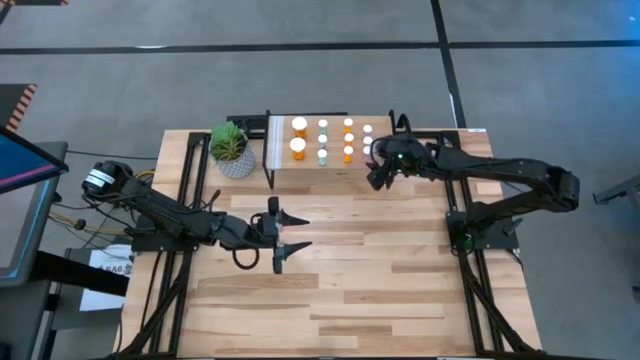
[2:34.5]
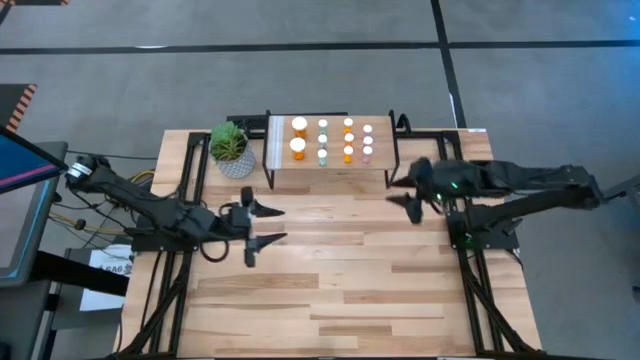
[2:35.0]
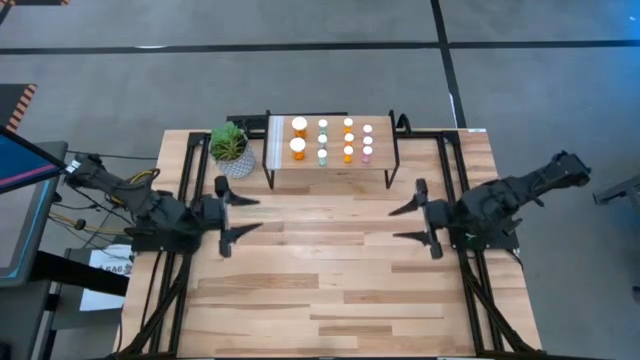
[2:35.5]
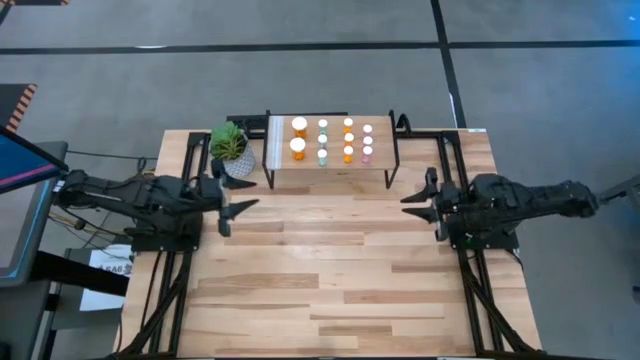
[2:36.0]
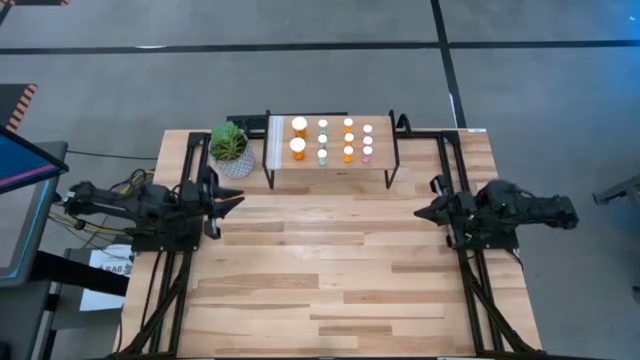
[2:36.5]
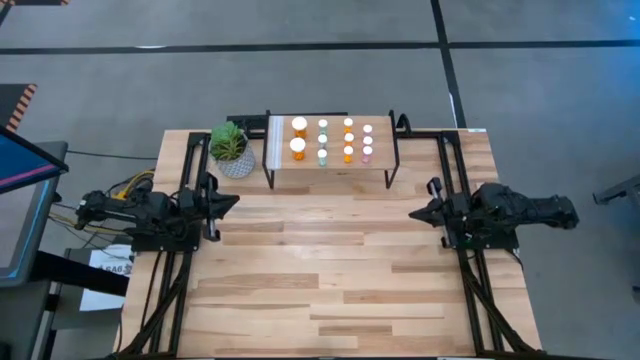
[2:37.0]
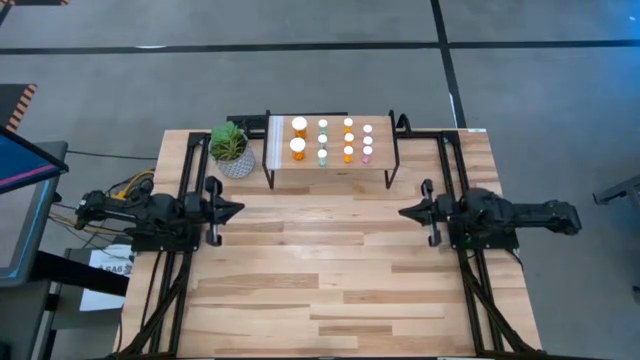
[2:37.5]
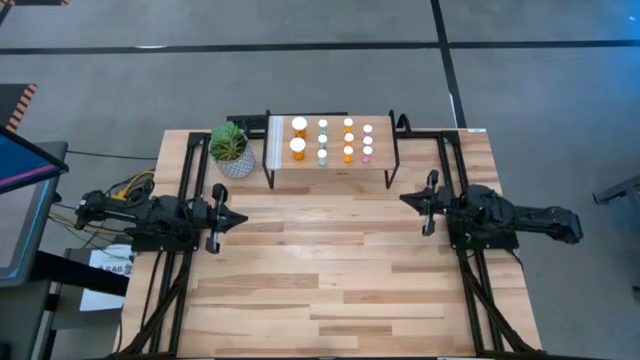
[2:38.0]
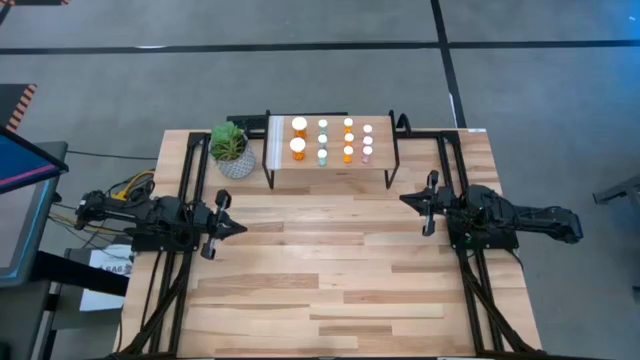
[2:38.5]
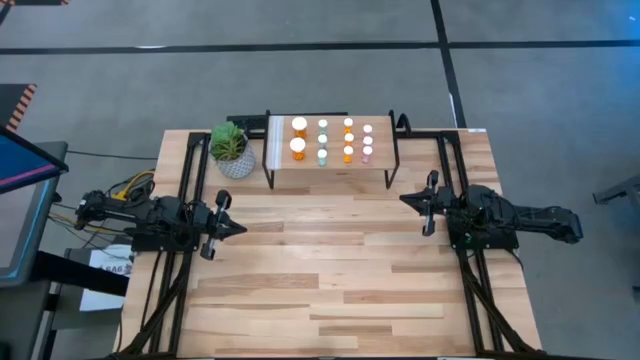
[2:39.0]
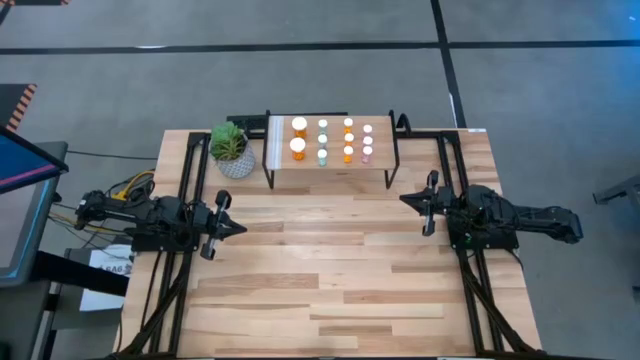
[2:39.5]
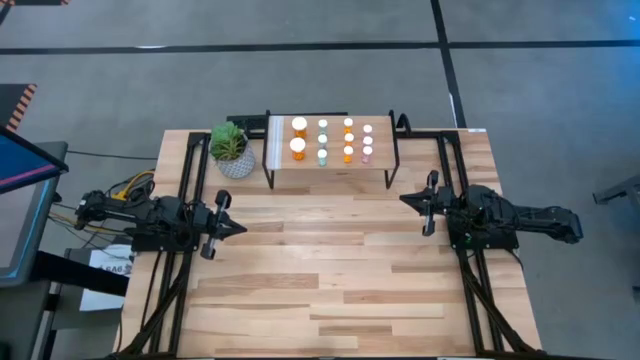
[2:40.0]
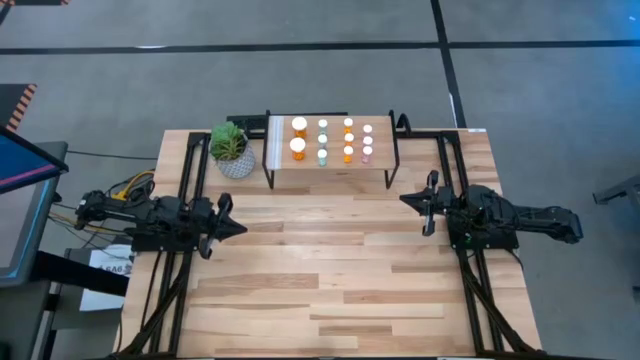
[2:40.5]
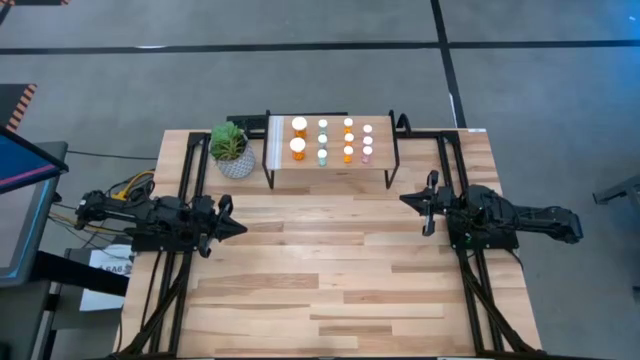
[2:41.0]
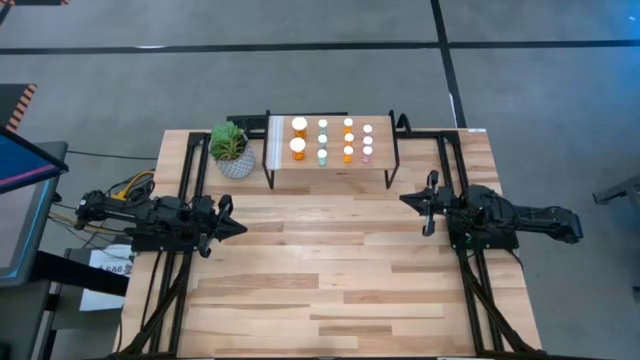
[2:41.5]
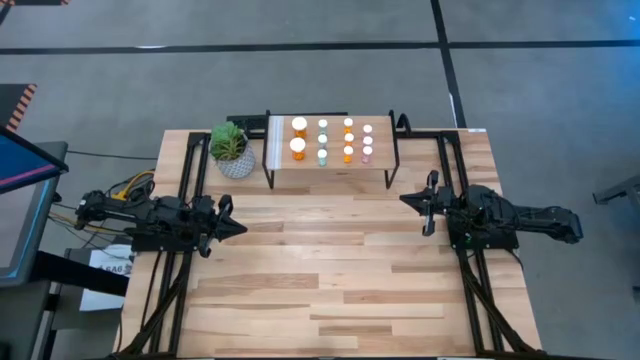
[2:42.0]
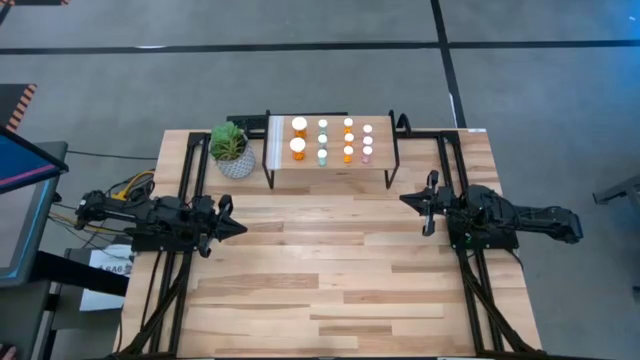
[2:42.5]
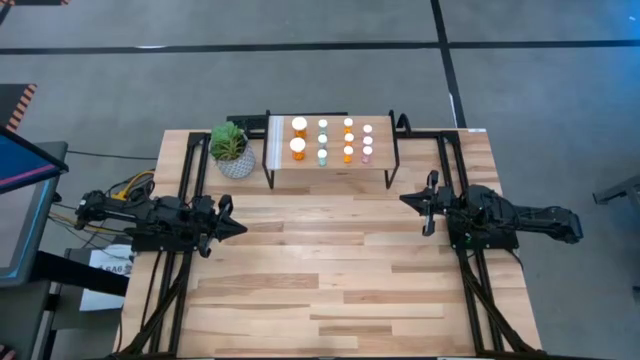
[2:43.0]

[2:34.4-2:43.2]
Task: Pick and place medicine bottles onto shelf by color
Return to Home Position

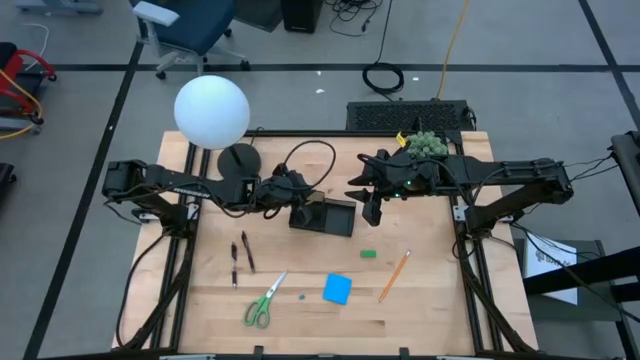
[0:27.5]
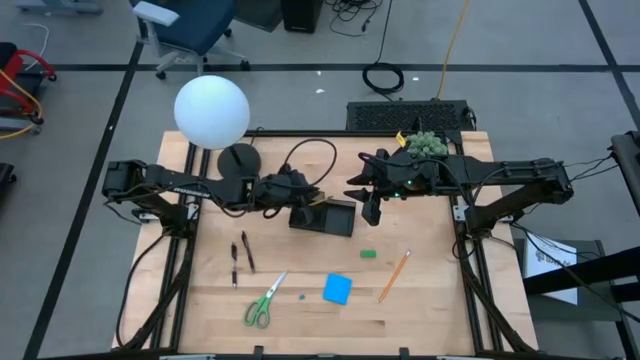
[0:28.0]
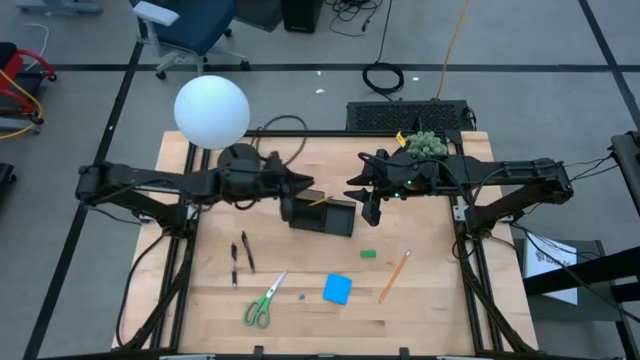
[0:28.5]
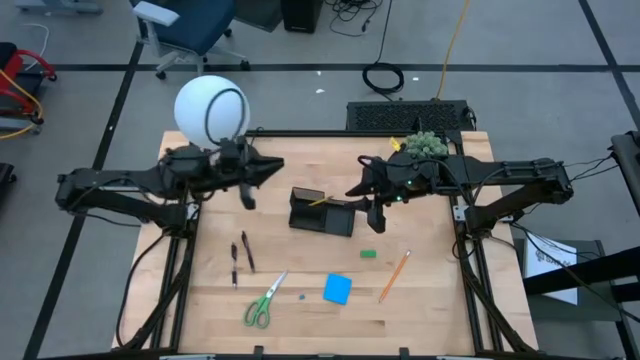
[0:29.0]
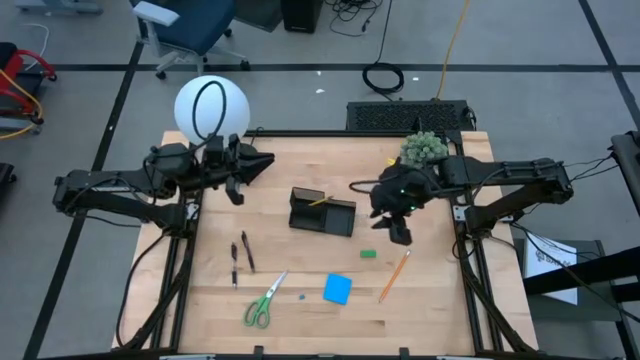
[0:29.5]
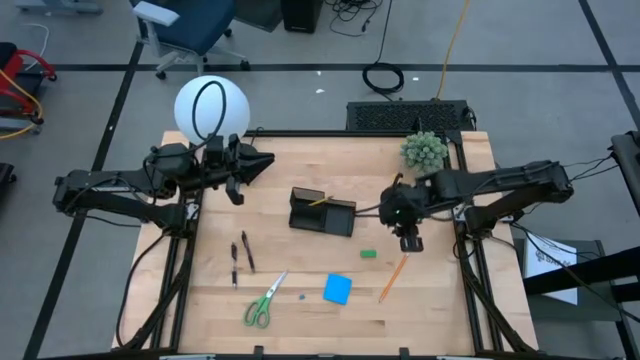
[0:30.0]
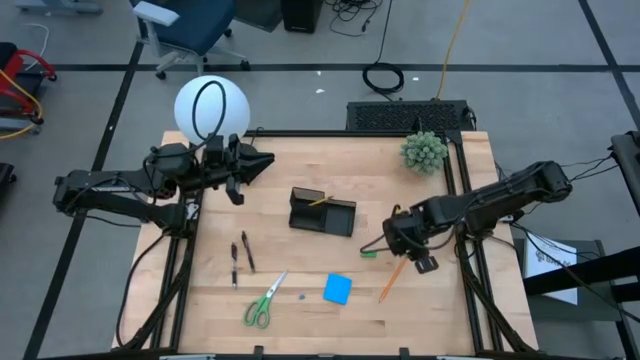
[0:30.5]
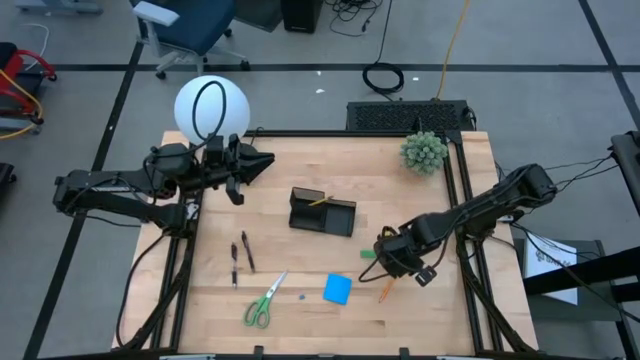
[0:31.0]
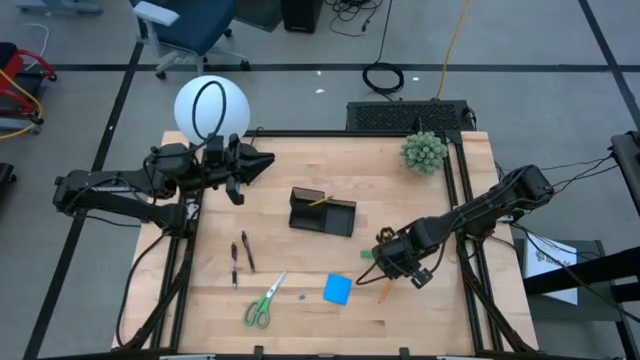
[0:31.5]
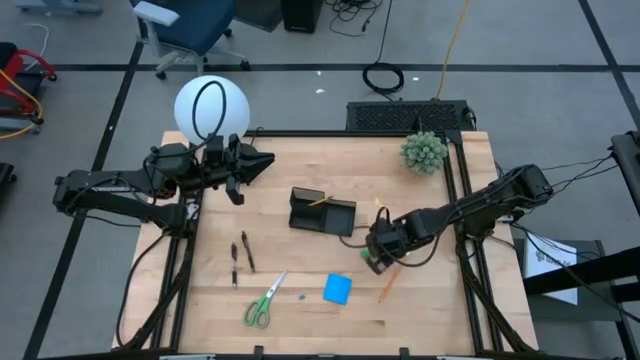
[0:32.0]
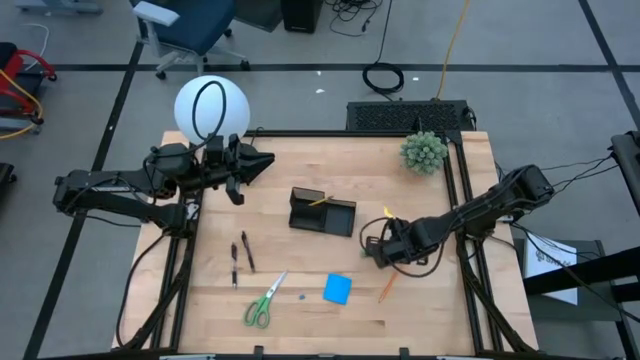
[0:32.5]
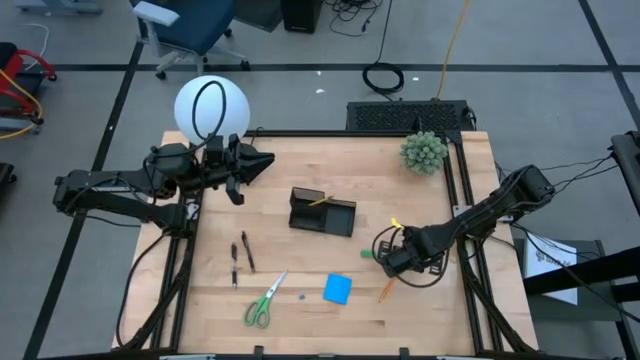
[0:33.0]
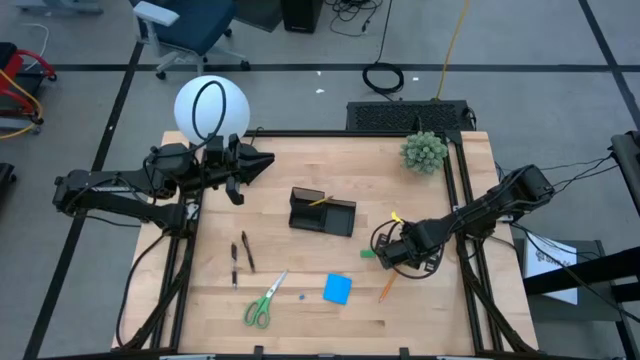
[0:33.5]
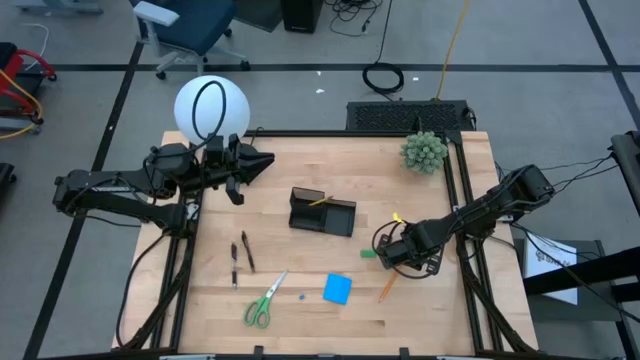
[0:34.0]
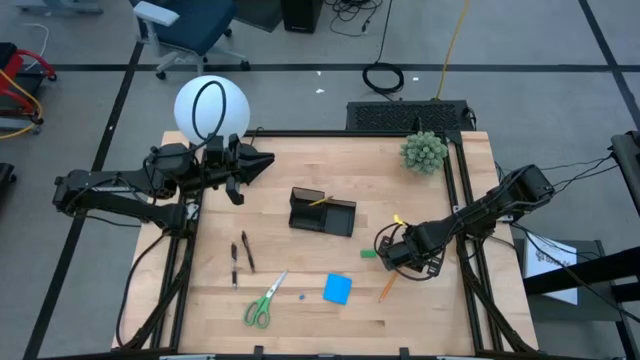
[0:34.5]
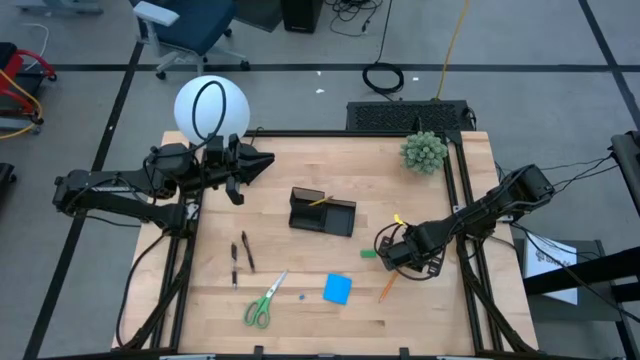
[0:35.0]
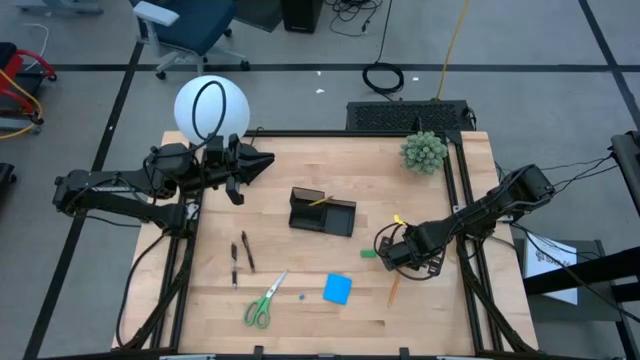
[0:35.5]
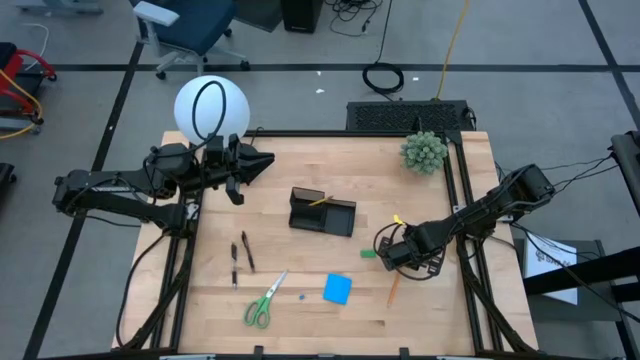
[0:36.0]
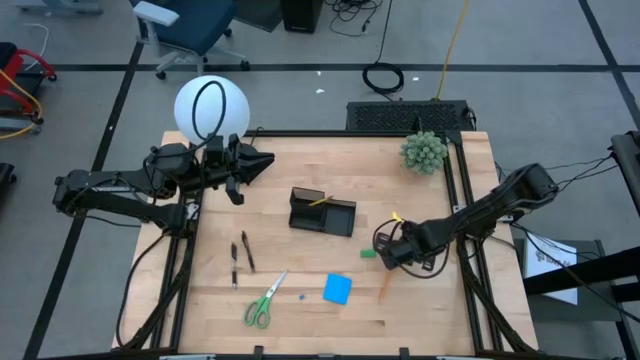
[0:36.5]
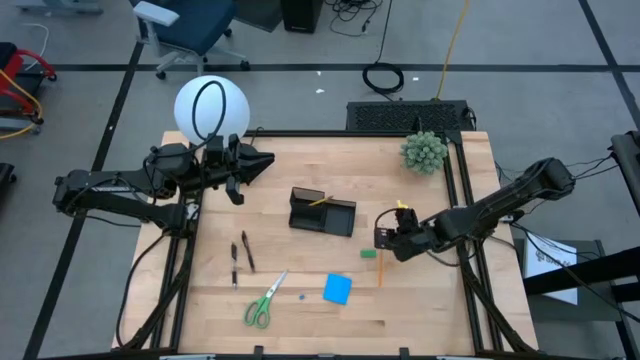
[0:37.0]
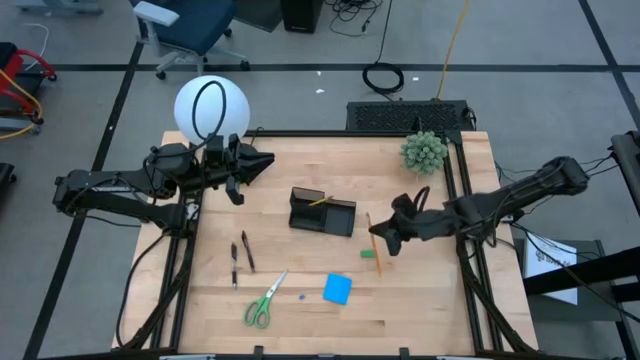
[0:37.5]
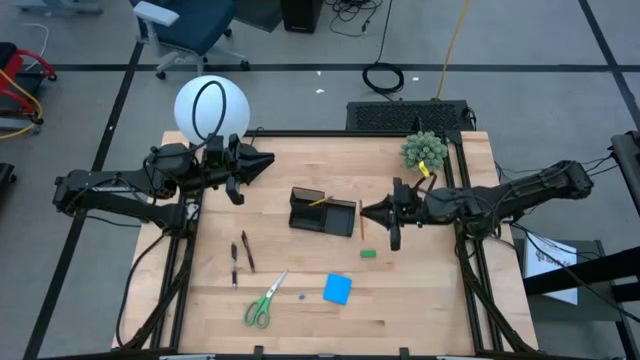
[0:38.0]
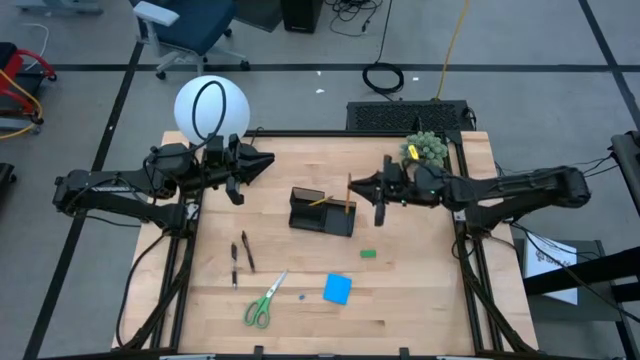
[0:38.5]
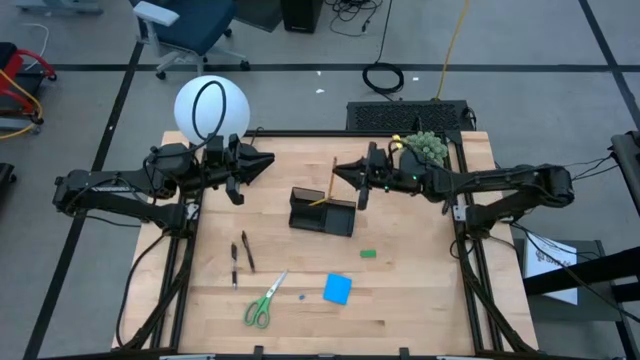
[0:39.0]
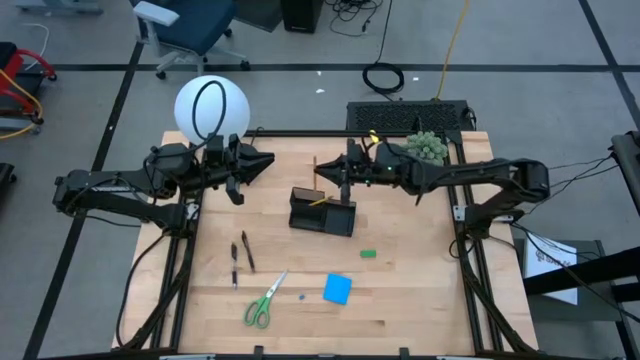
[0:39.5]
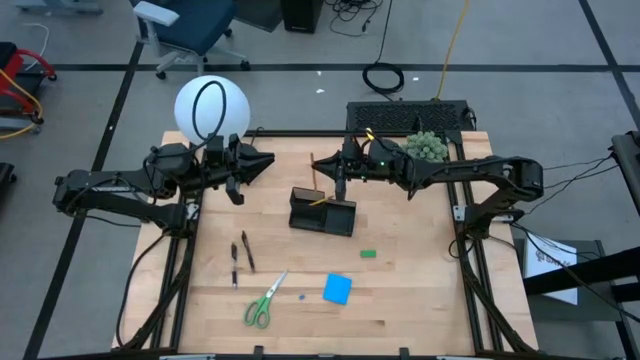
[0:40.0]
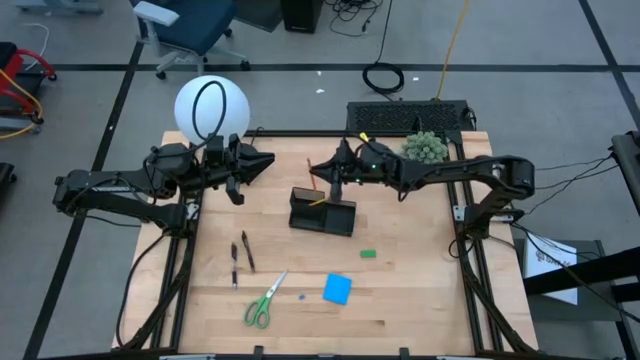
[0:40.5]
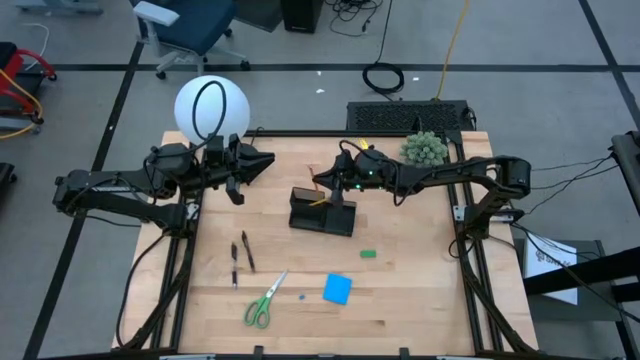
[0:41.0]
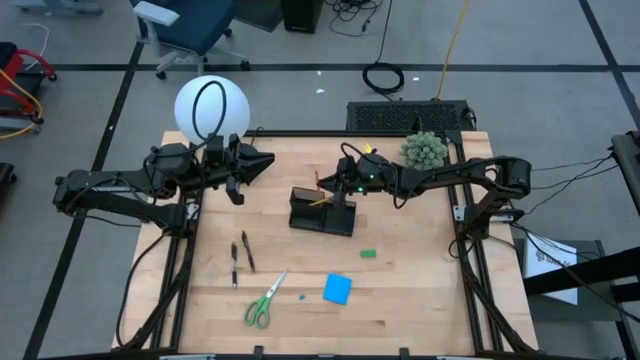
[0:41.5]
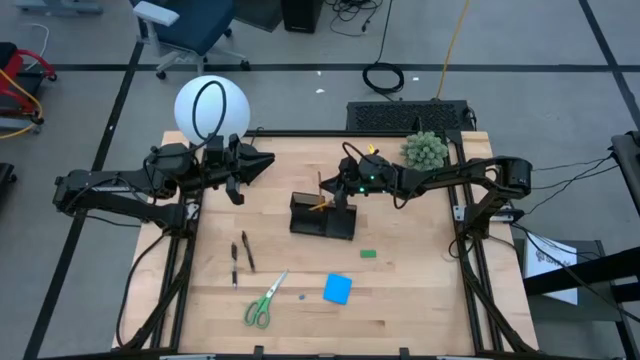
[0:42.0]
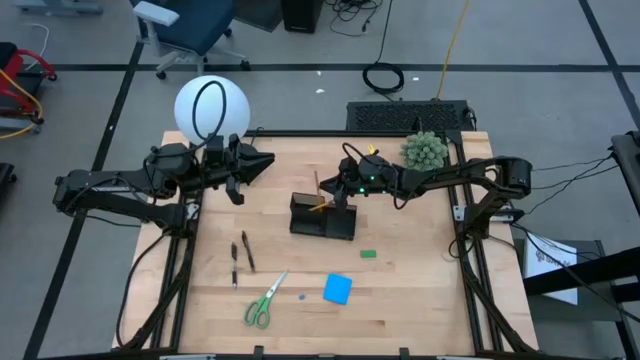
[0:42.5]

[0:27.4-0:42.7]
Task: Pick and place office supplies into organizer
Put the orange pencil into the desk organizer
